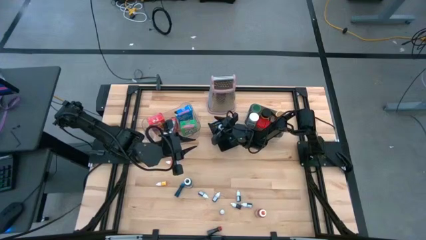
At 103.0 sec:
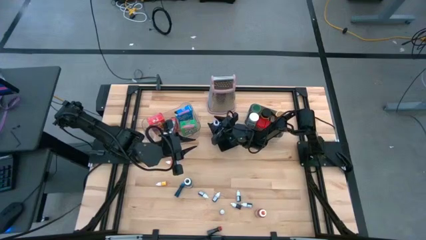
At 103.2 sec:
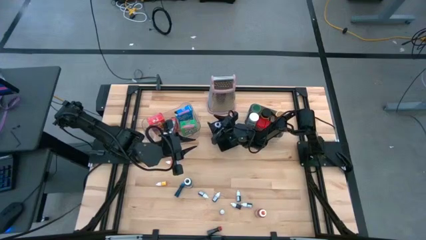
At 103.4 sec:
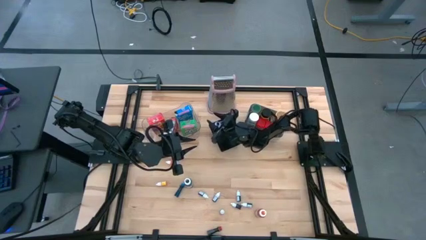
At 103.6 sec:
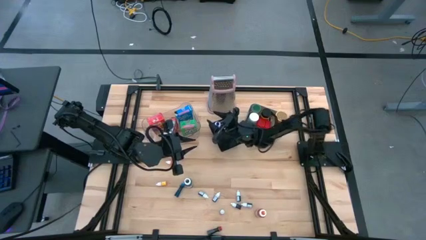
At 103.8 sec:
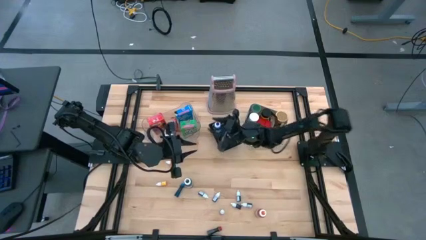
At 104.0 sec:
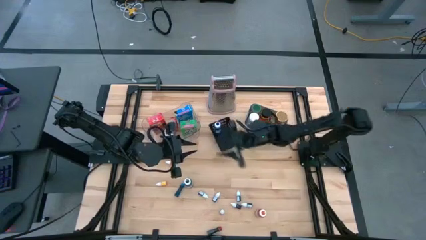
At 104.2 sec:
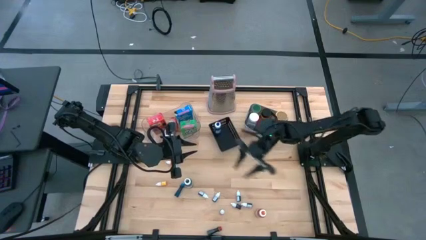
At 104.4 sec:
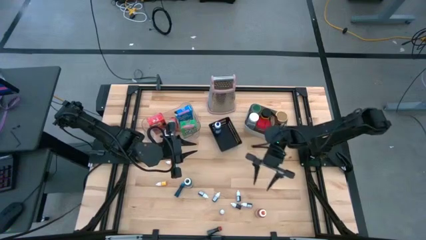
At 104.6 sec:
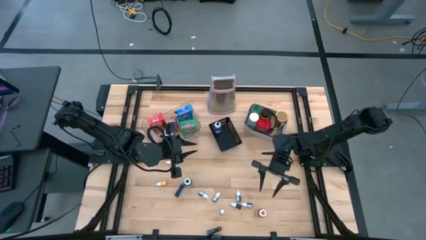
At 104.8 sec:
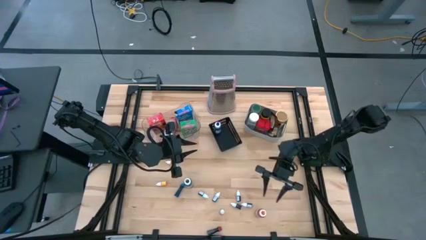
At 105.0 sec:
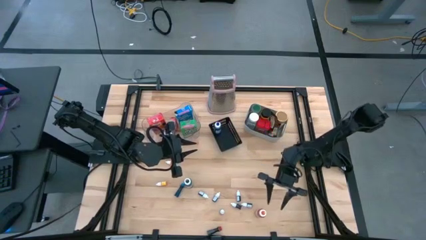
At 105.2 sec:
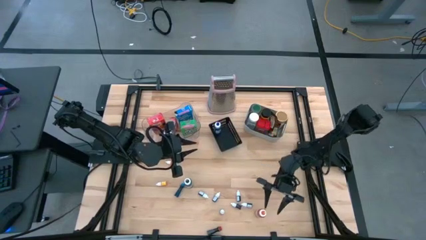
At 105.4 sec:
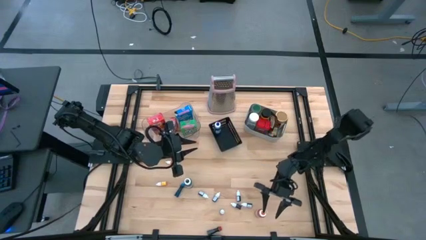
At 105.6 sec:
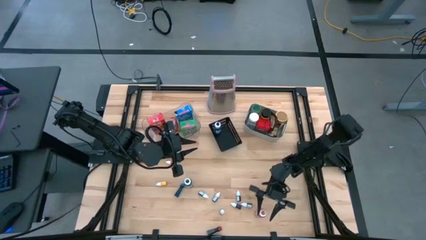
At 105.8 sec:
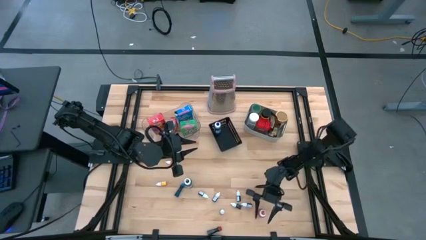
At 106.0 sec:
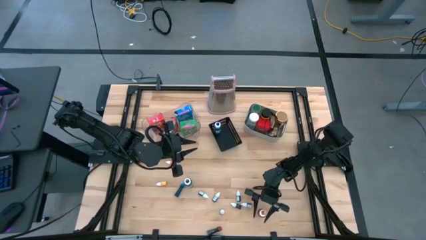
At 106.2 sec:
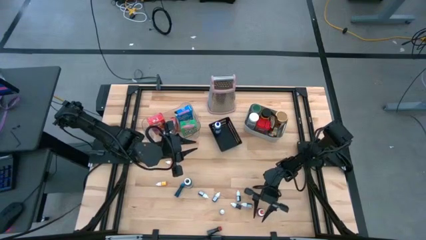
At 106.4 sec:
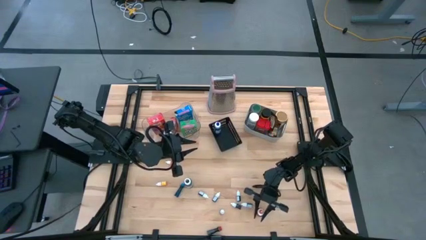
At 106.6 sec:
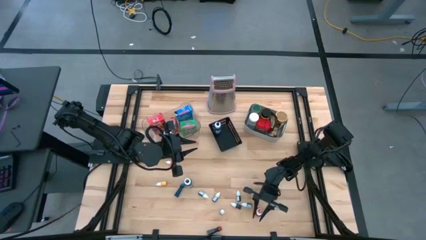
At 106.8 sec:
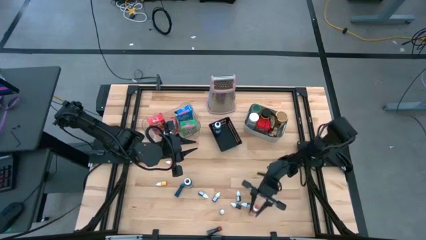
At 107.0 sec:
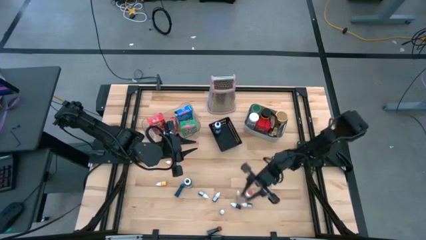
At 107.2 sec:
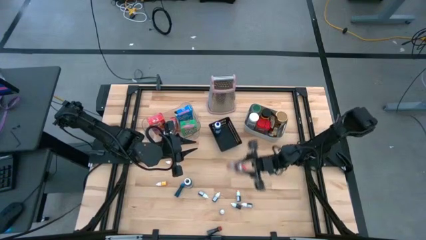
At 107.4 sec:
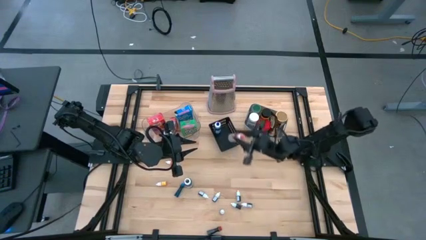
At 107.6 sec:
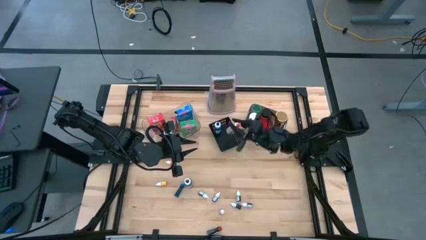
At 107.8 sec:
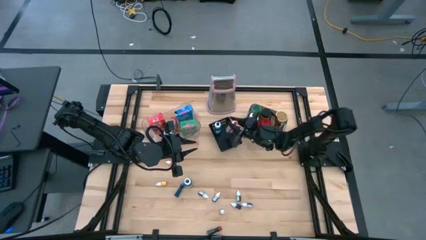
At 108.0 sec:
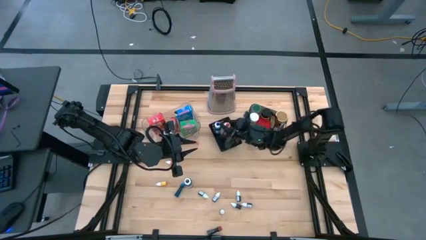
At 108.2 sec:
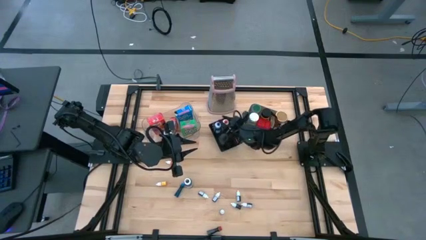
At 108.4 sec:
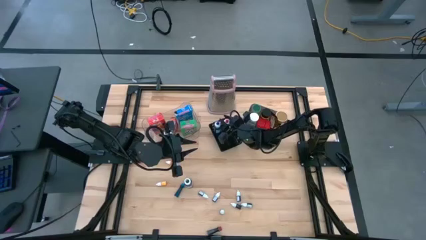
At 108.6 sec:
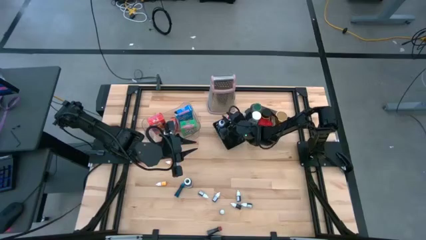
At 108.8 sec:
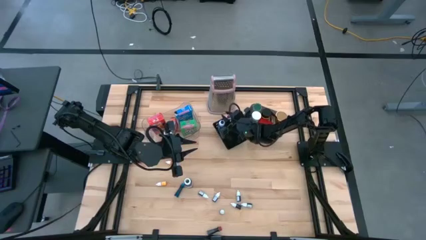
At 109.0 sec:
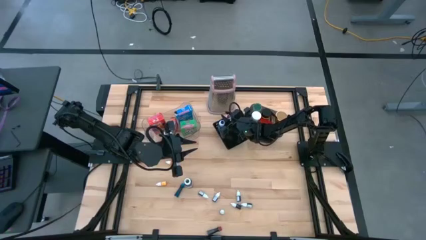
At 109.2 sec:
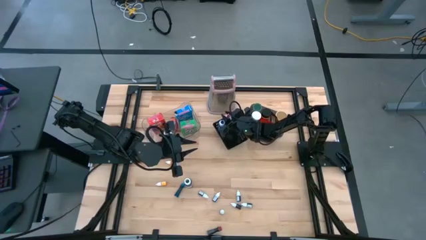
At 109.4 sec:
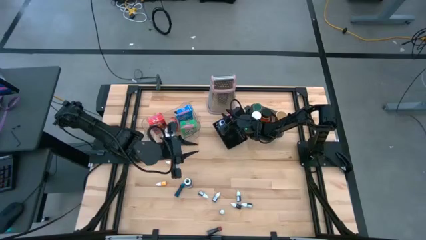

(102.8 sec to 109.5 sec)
Task: Pick & Place Kitchen Items
Put the large orange food coloring bottle into the black bin

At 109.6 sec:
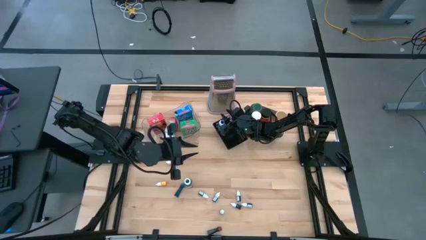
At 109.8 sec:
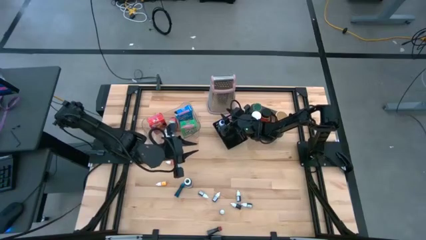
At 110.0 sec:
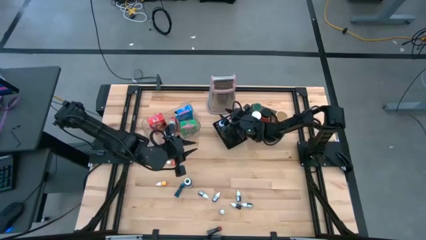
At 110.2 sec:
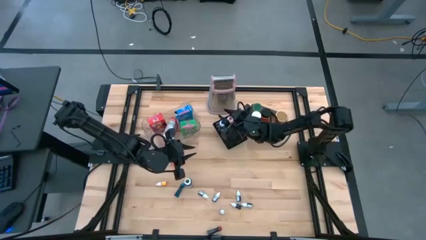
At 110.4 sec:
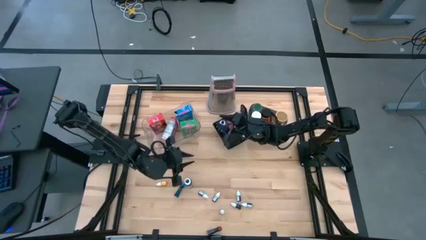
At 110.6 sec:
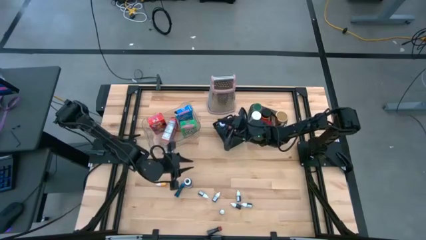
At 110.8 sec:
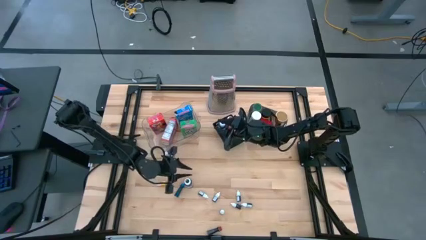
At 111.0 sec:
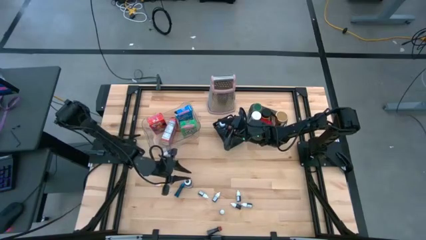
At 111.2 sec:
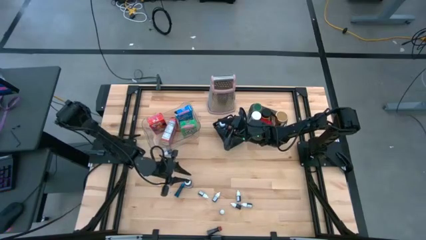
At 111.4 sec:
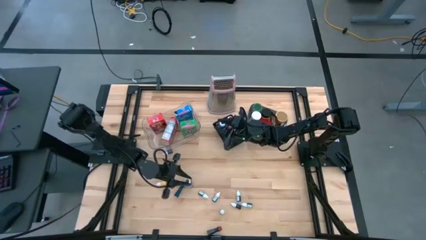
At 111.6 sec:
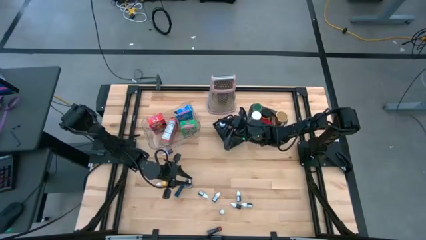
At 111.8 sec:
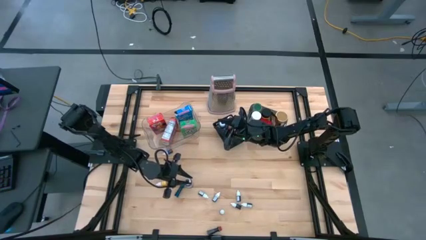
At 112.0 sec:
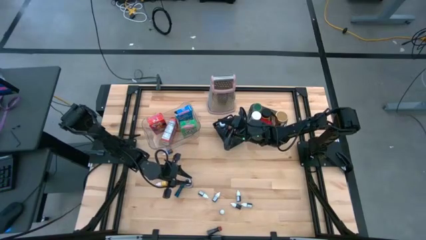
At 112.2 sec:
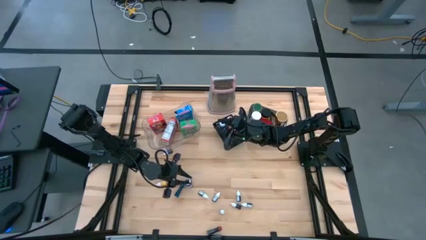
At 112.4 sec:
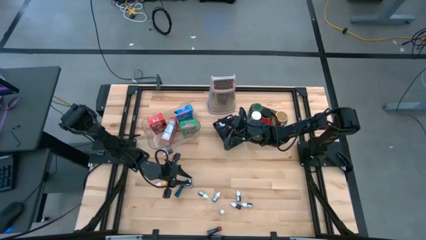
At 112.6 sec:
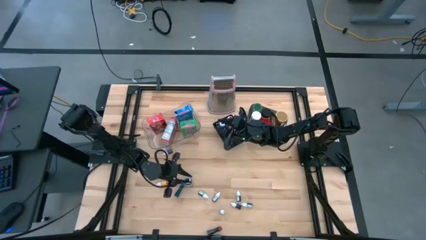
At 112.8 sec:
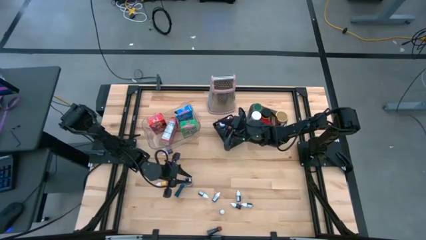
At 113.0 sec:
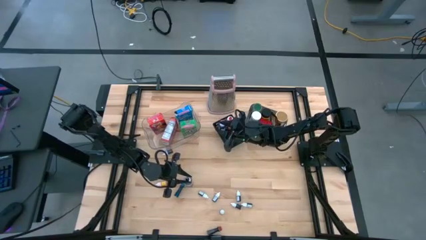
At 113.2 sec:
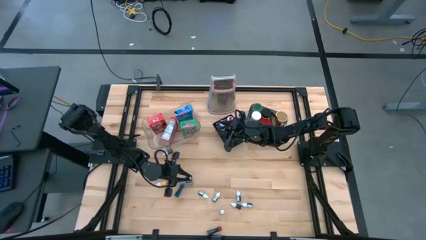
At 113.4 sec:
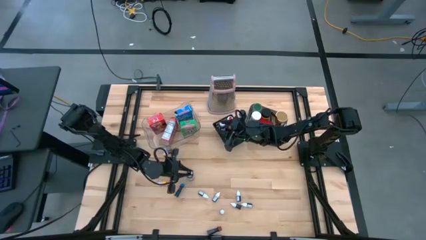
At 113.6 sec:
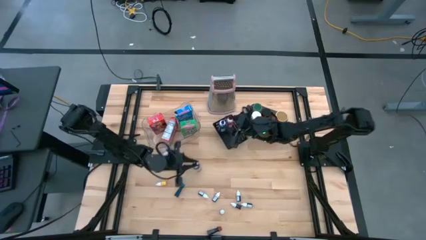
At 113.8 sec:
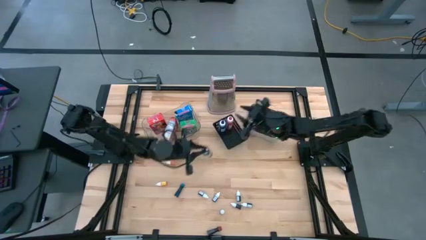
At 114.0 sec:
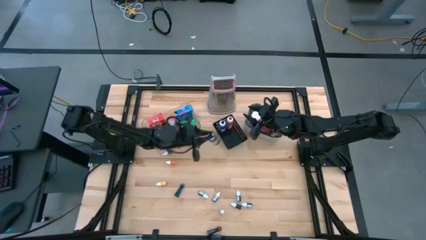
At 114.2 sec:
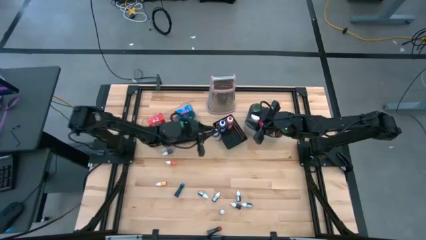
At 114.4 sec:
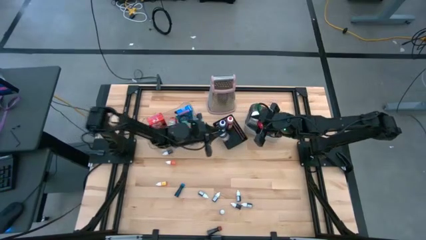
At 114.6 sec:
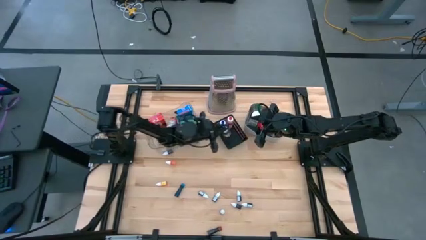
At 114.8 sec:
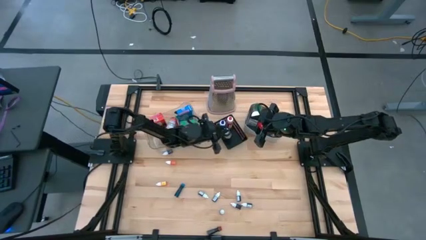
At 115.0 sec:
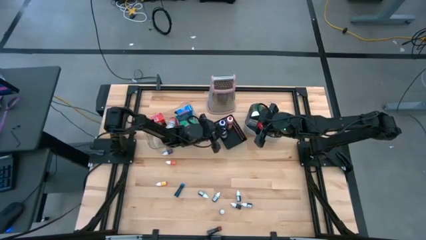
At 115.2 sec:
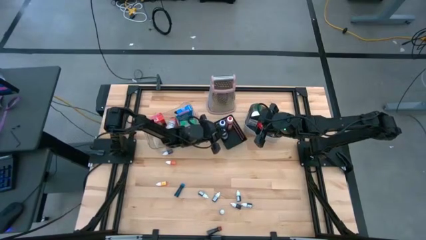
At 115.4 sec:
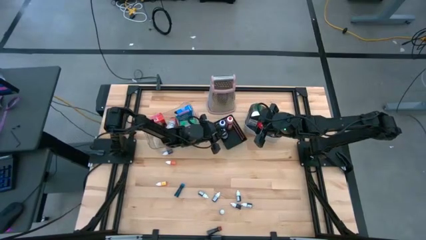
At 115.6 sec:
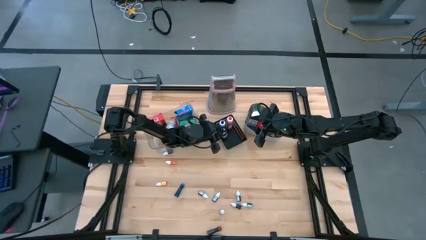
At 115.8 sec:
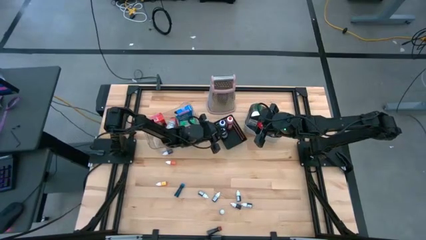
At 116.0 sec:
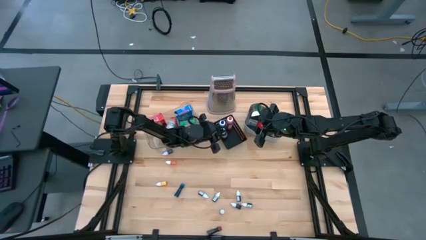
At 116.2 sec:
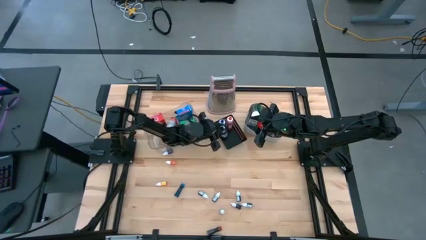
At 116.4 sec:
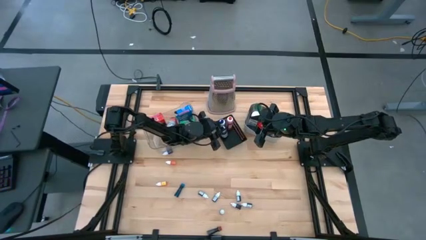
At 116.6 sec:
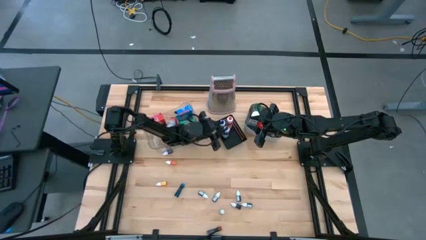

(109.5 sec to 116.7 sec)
Put the large black food coloring bottle into the black bin
